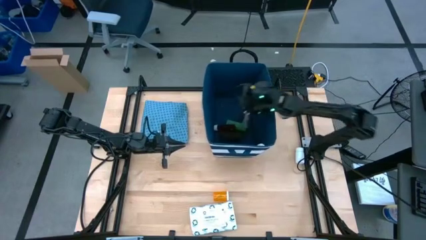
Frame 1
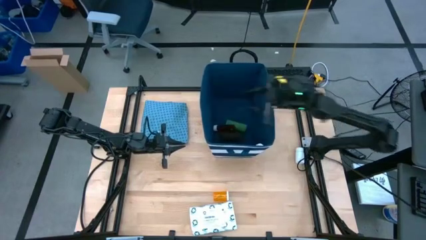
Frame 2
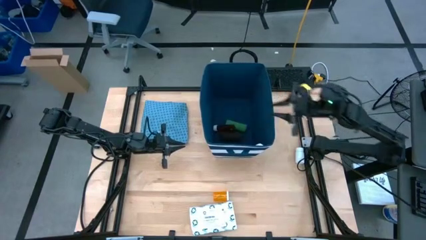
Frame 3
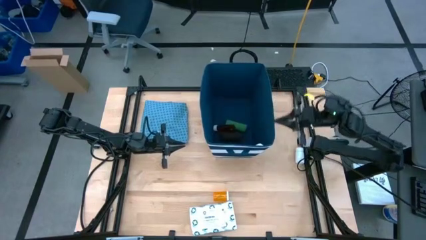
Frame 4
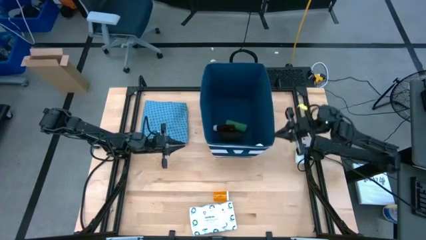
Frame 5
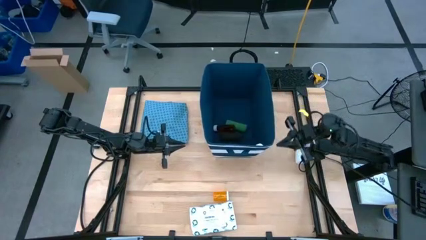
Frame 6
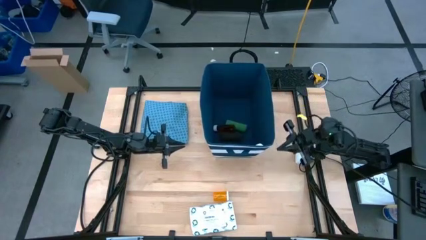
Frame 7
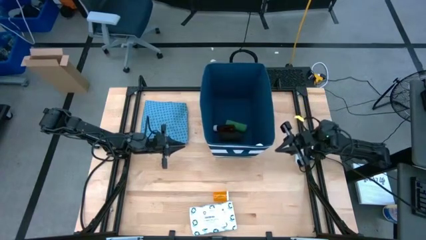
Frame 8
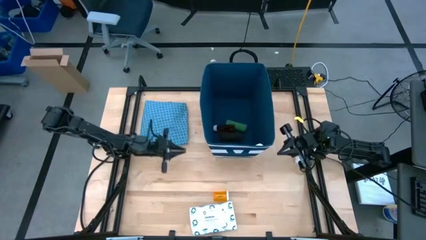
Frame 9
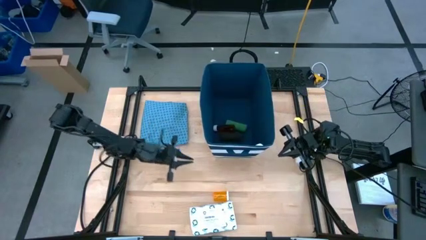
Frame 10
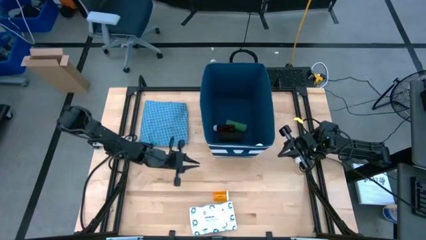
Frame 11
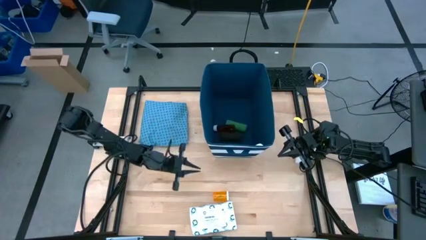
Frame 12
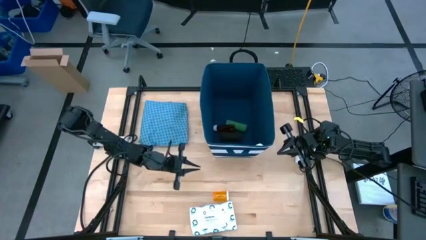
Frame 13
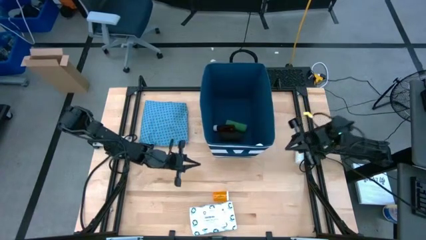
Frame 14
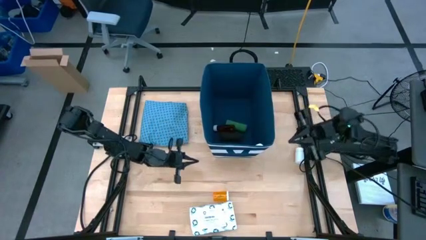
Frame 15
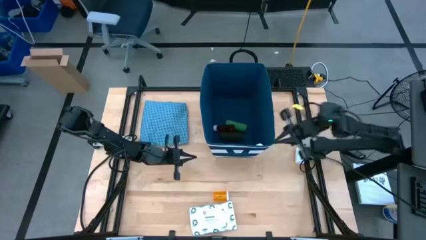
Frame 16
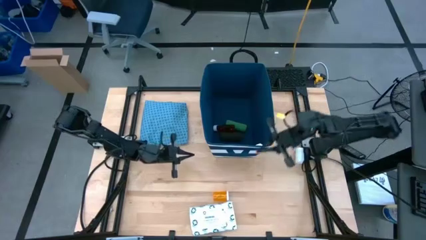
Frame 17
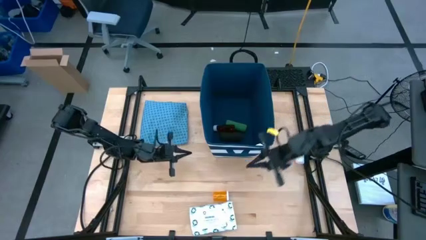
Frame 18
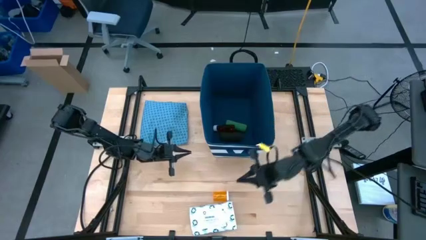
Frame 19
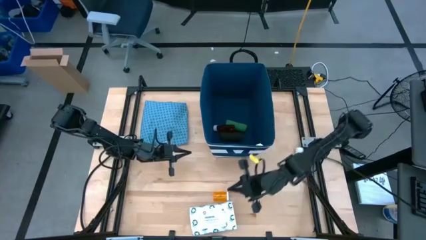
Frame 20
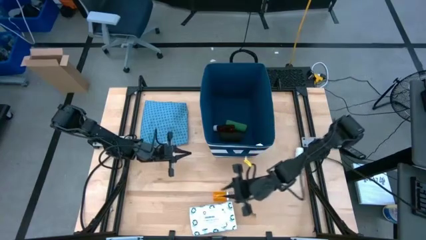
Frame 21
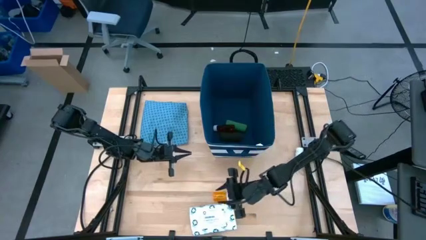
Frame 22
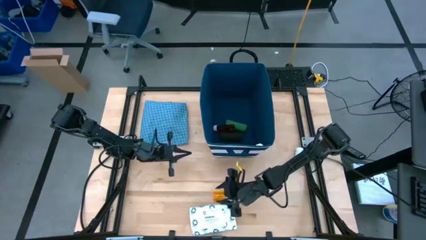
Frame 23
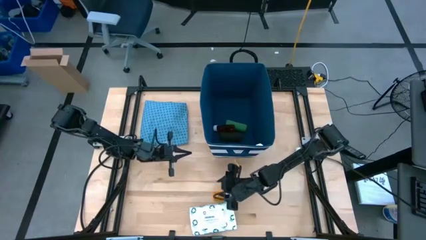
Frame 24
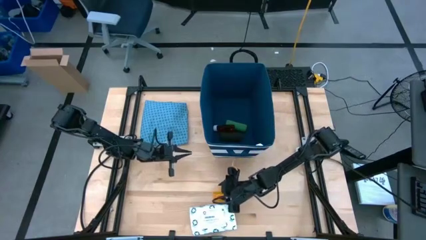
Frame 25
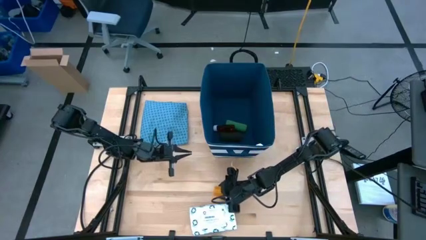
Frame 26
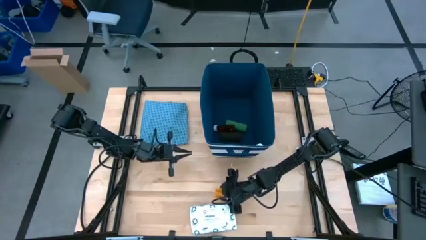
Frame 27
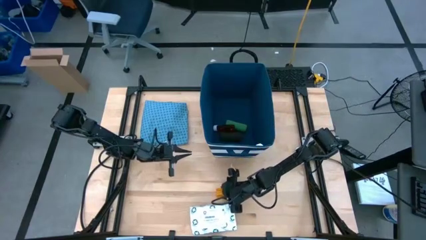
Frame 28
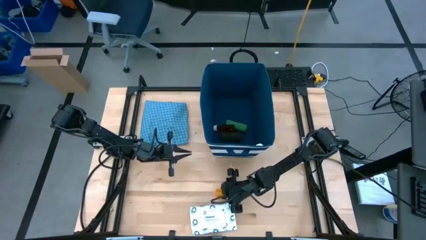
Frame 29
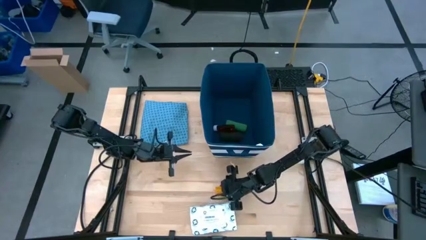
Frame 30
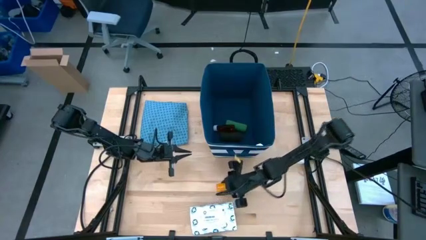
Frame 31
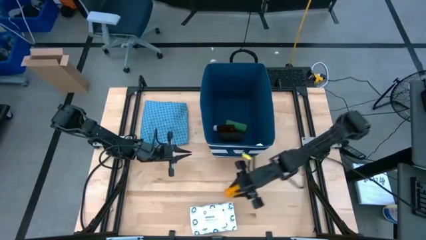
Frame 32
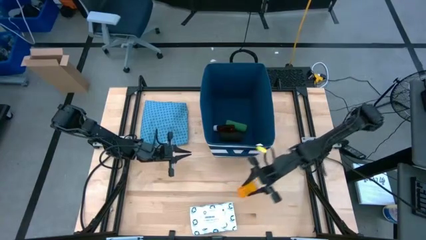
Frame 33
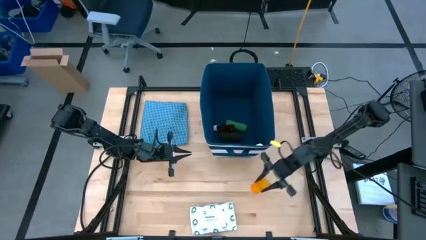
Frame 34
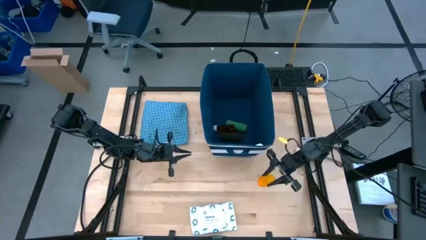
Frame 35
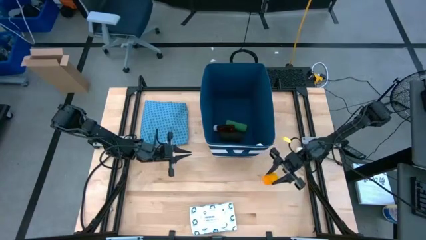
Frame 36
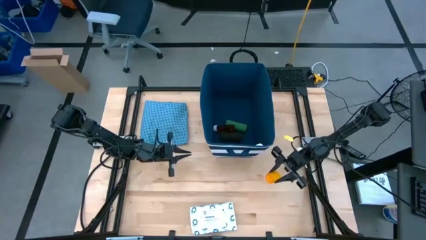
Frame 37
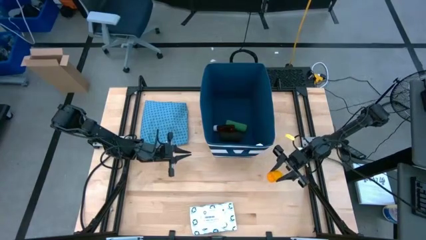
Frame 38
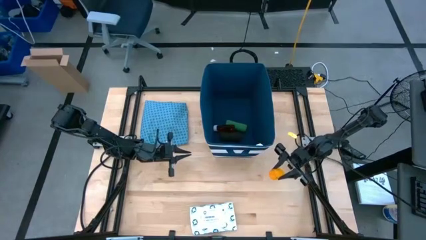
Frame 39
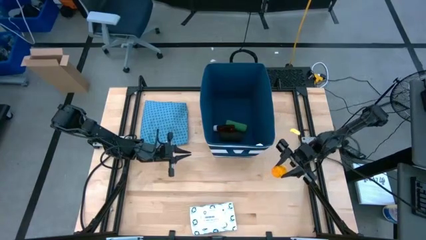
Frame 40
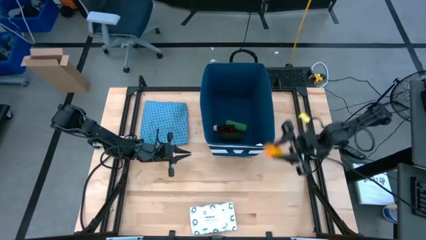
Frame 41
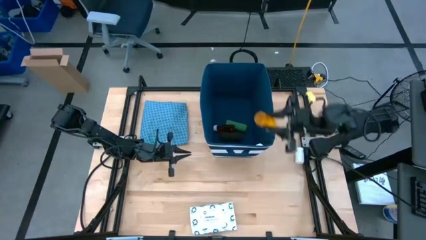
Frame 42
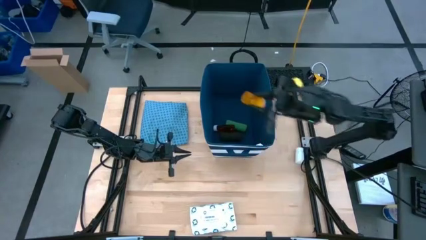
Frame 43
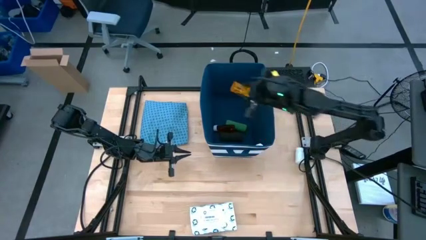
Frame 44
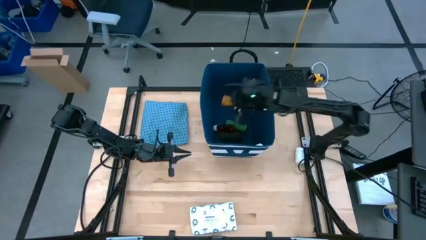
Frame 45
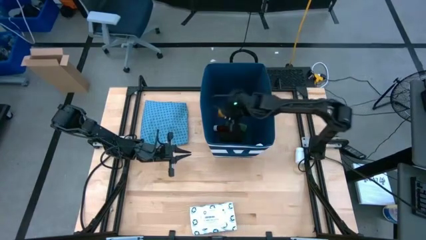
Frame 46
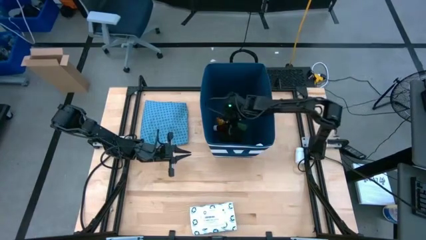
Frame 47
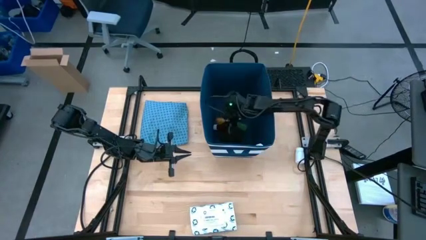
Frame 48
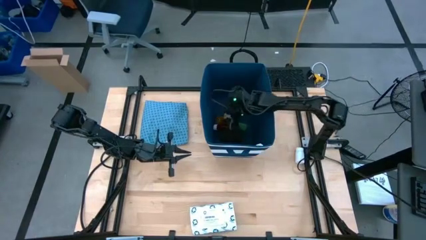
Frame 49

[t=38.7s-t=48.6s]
Task: Pick & place medical supplies in basket/bin
Put the orange pill bottle into the blue bin

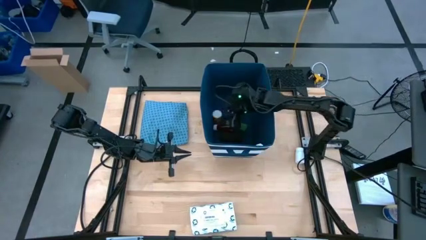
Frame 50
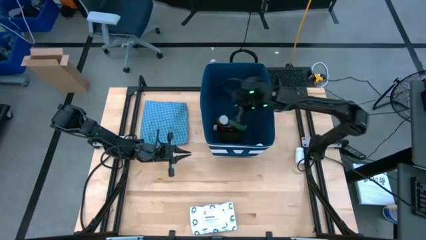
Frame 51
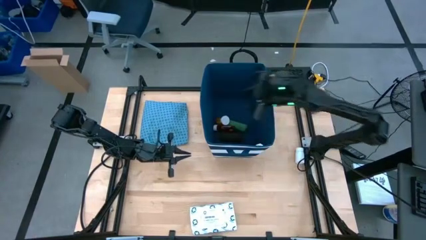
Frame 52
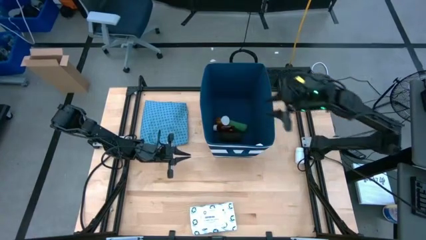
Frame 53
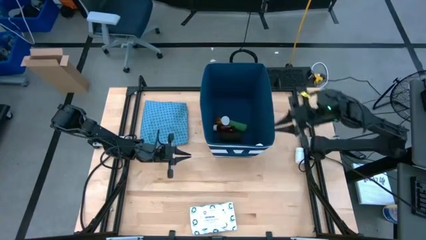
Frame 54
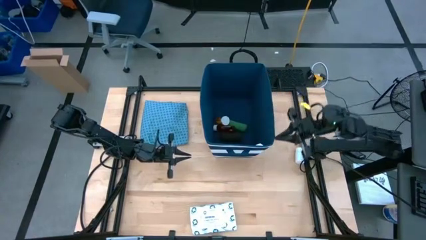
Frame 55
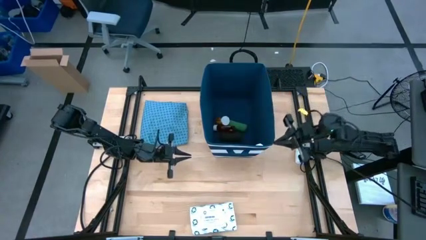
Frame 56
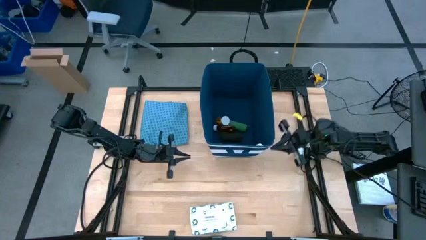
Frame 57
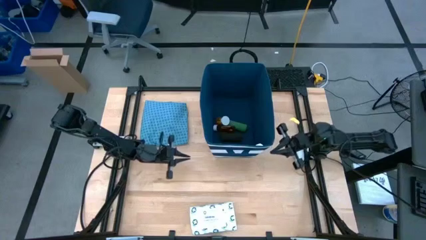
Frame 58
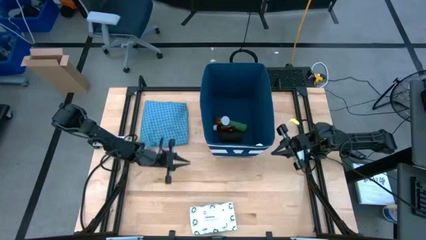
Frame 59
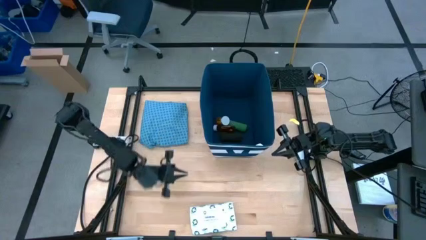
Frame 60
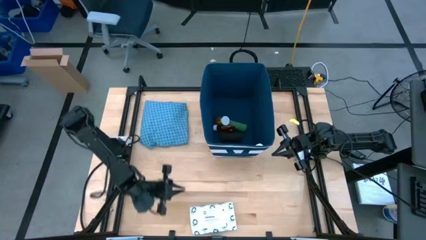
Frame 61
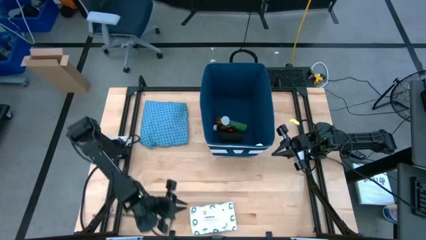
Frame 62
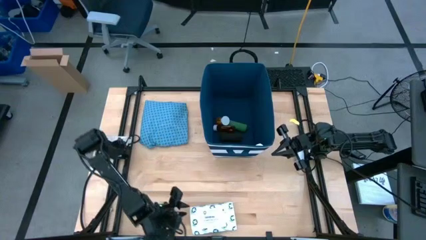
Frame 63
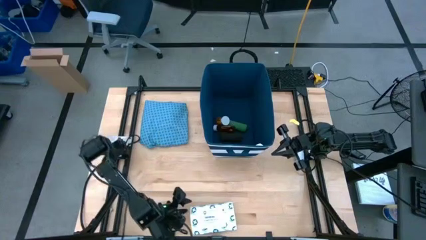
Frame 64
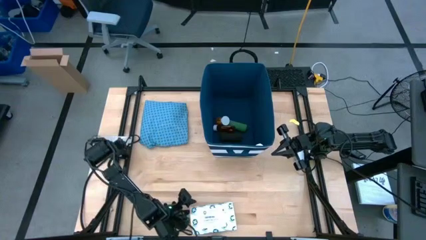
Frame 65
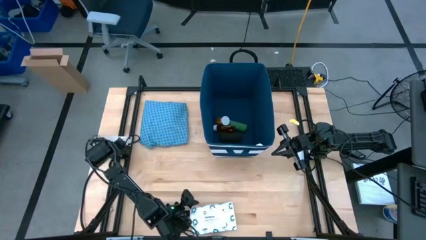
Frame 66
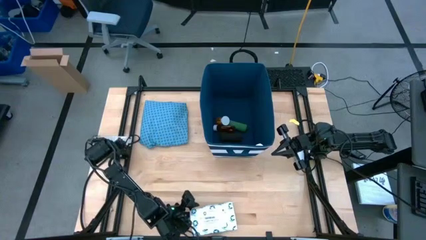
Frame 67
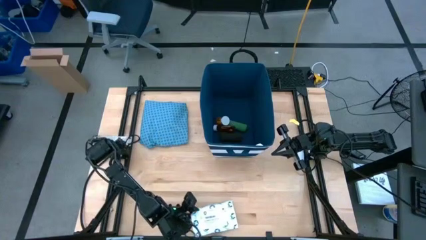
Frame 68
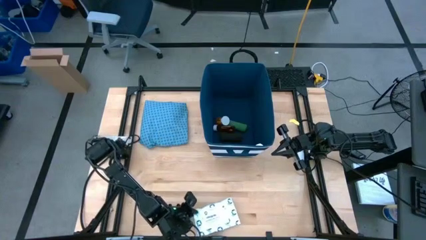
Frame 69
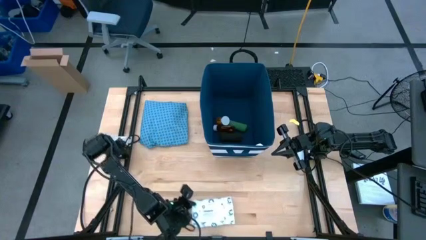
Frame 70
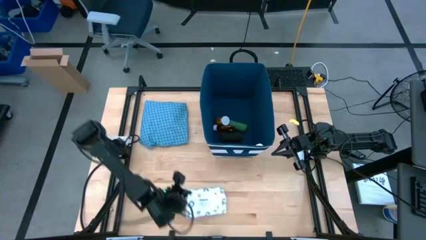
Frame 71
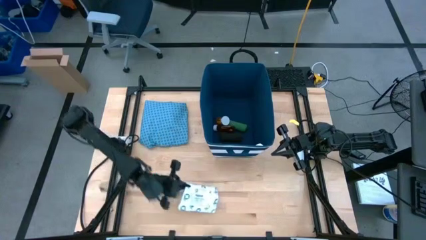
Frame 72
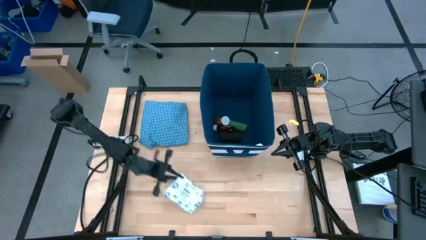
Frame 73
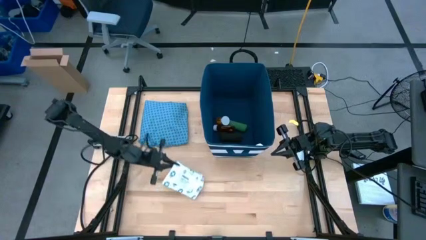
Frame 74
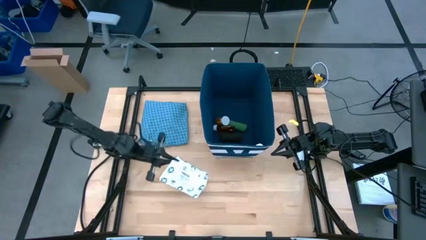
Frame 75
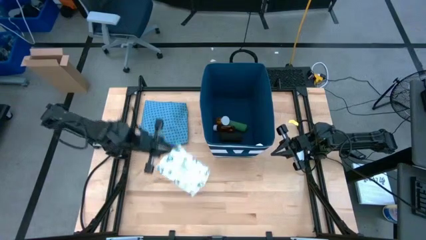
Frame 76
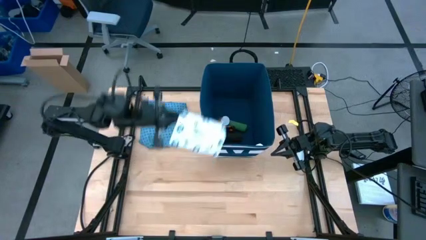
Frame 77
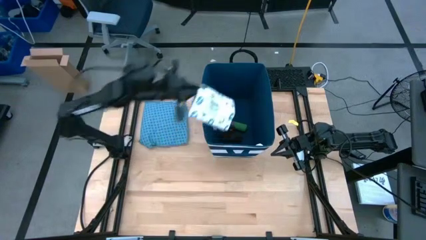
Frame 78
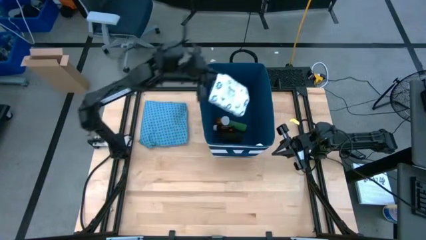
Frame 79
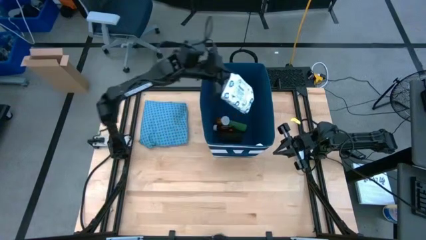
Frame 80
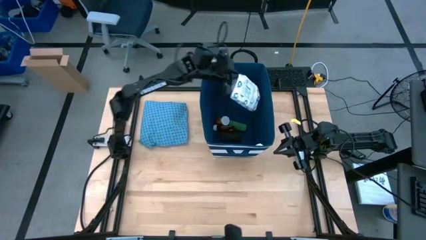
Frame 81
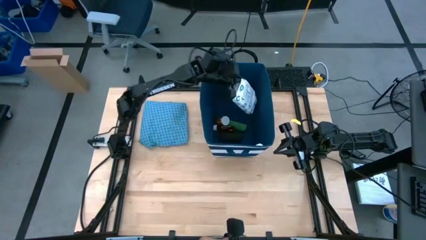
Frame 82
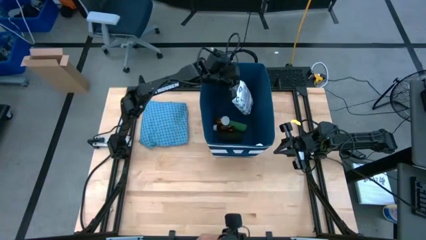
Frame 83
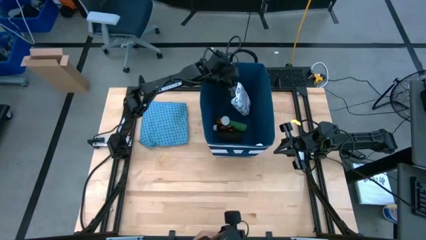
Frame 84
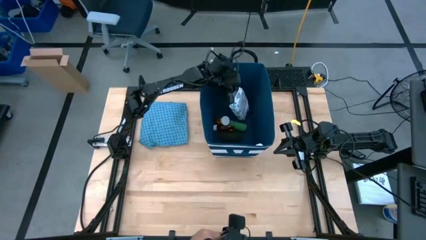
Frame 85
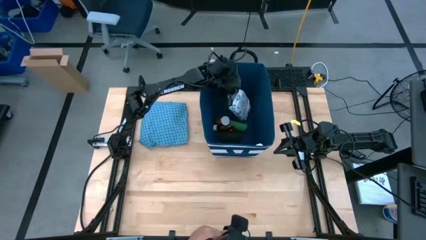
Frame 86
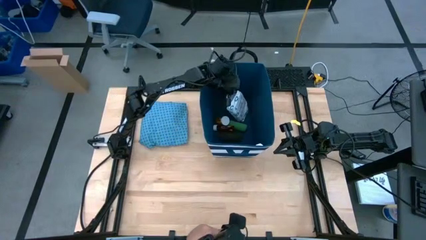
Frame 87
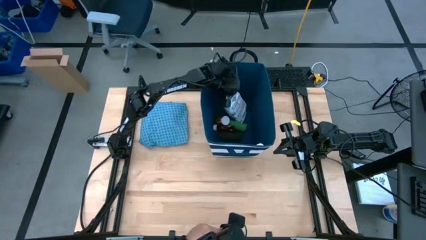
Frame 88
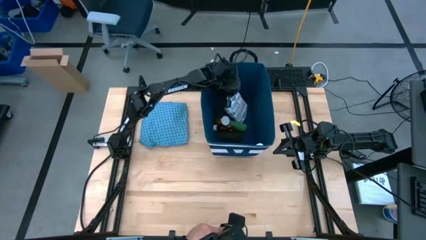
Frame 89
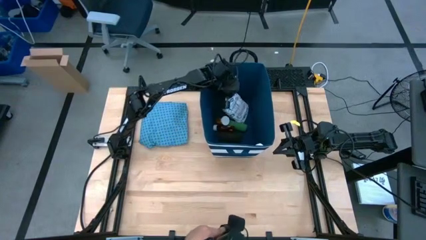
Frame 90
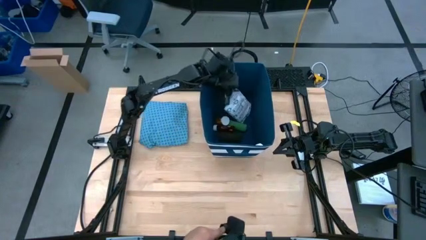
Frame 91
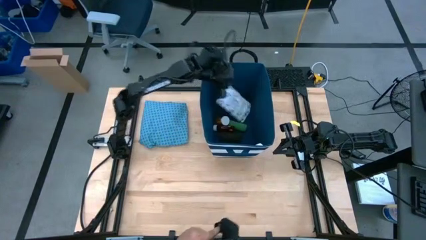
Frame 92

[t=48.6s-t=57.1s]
Put the white mailer bag into the blue bin
